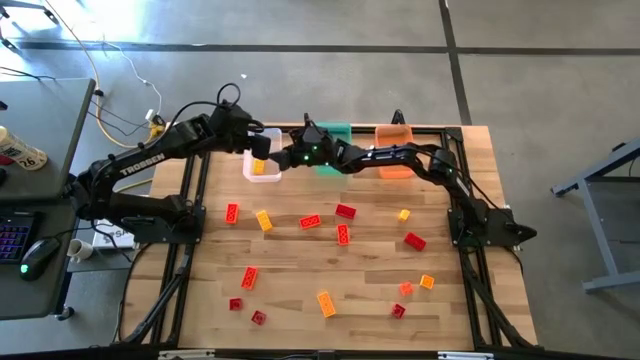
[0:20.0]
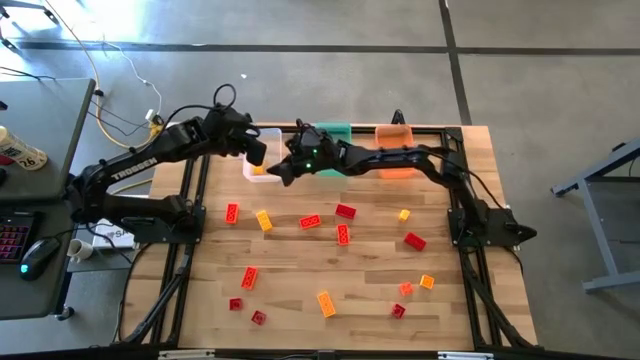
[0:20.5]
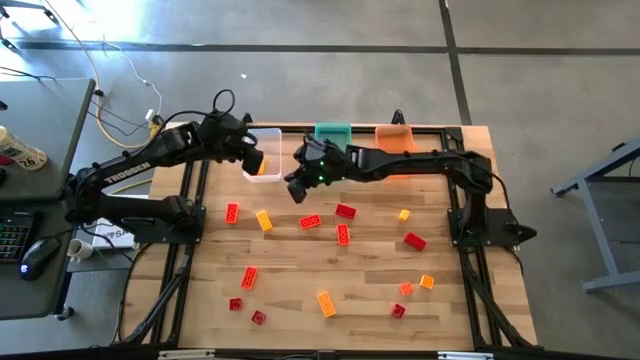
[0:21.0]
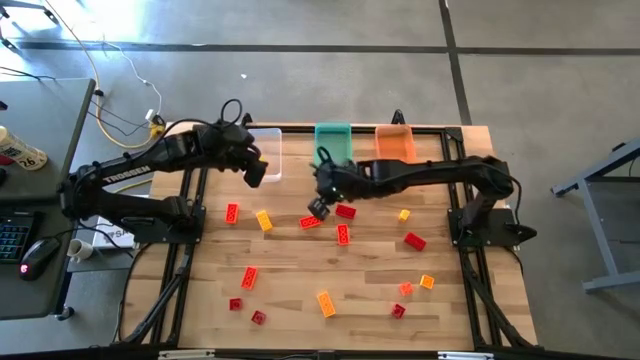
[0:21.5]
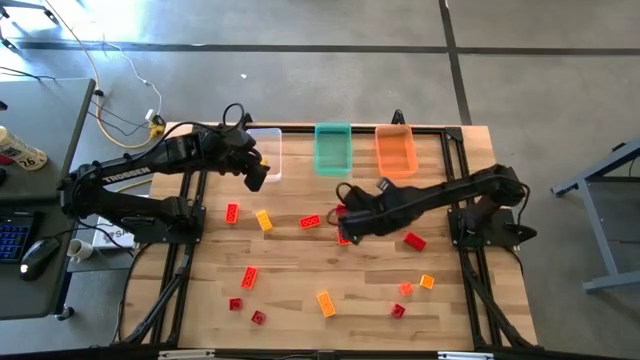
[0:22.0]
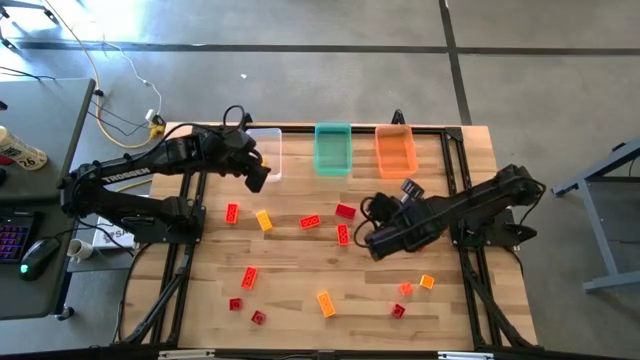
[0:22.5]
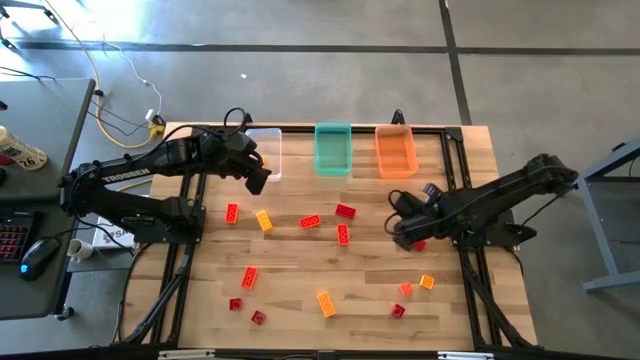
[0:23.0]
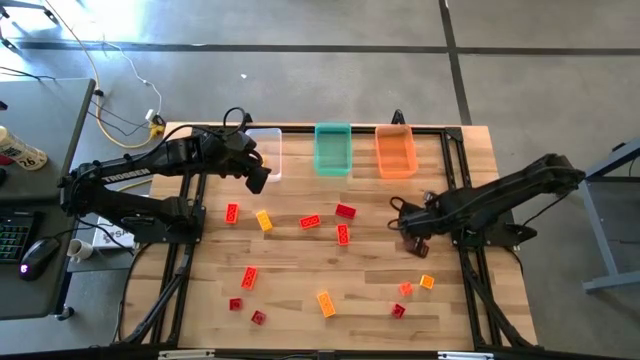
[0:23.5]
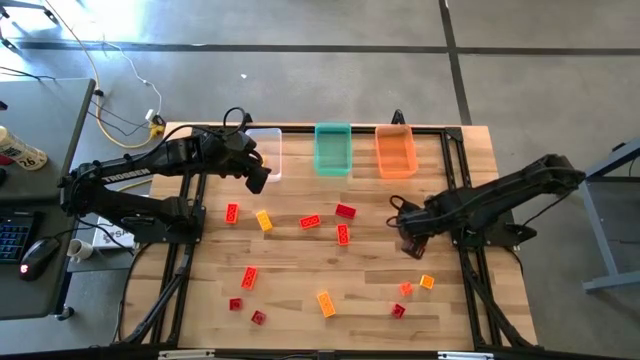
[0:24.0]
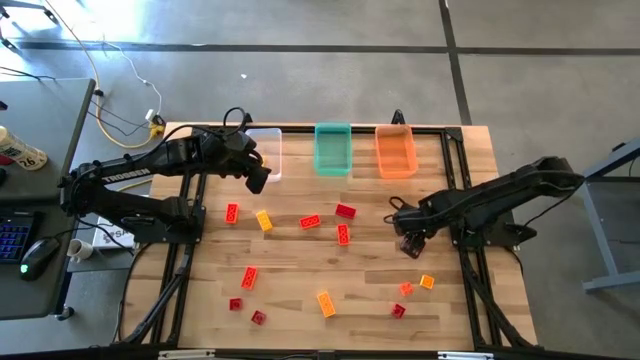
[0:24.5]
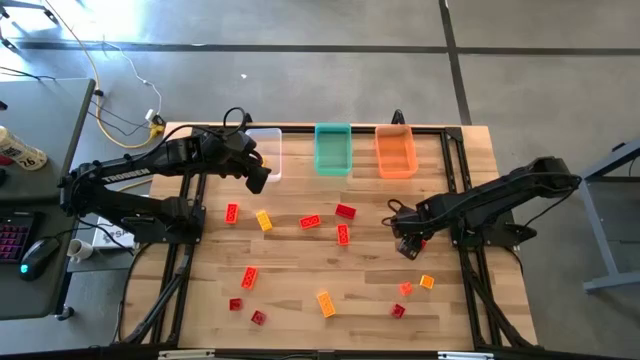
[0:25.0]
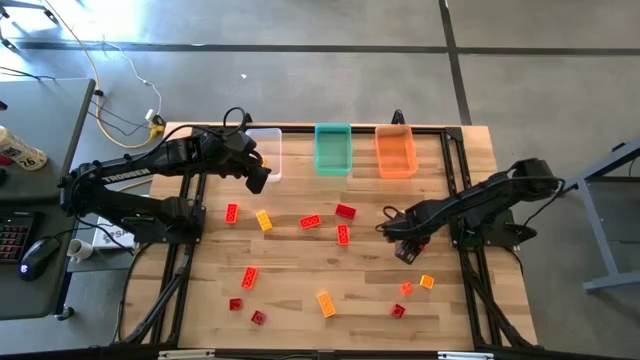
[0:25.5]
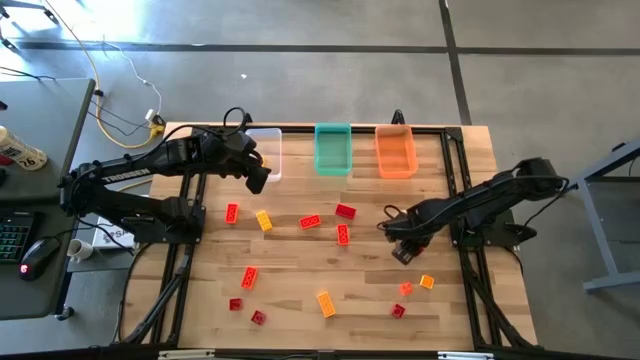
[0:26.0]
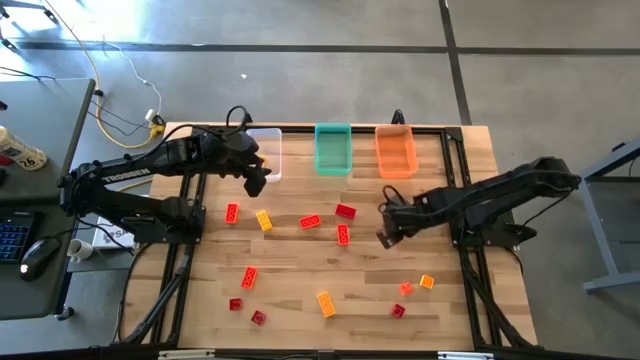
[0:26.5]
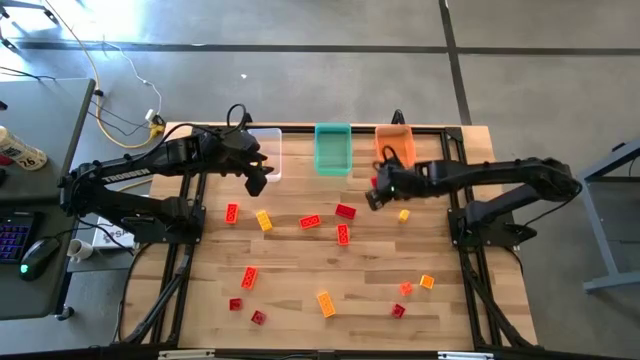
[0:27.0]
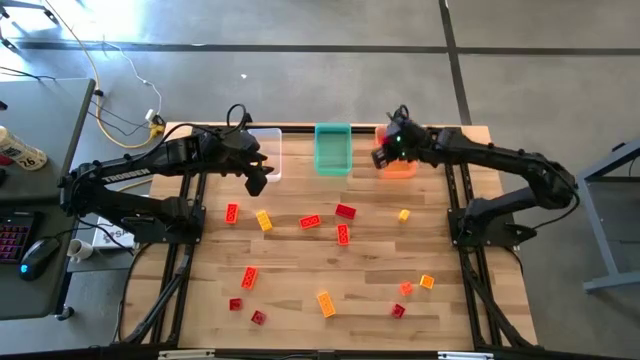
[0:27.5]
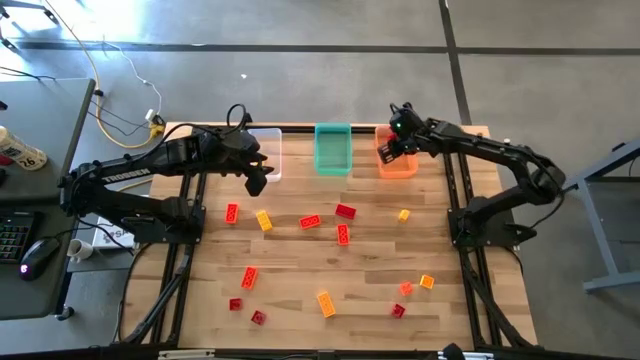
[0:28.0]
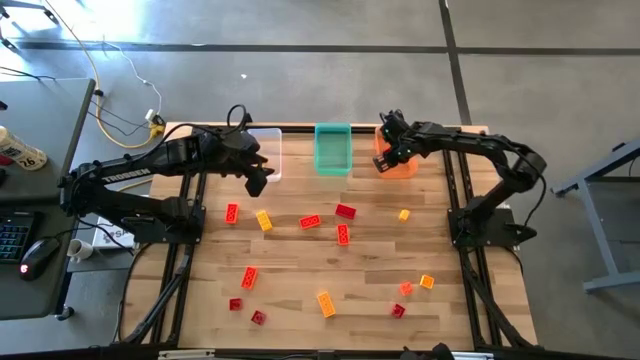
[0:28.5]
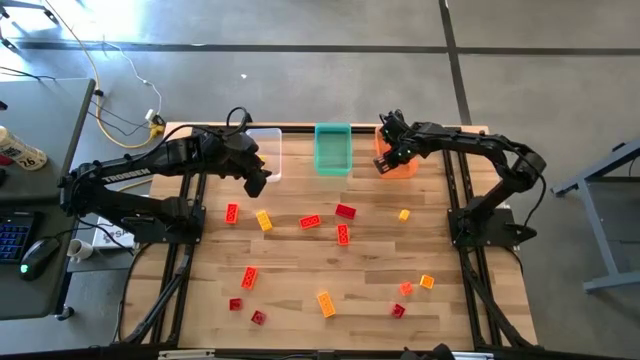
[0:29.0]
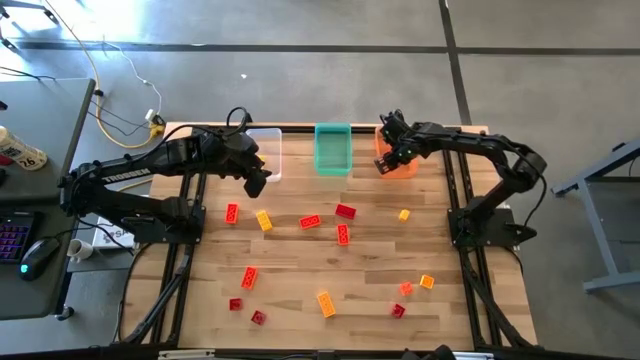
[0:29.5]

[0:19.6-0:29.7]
Task: Sort & place blocks by color
Put the red game piece into the orange bin

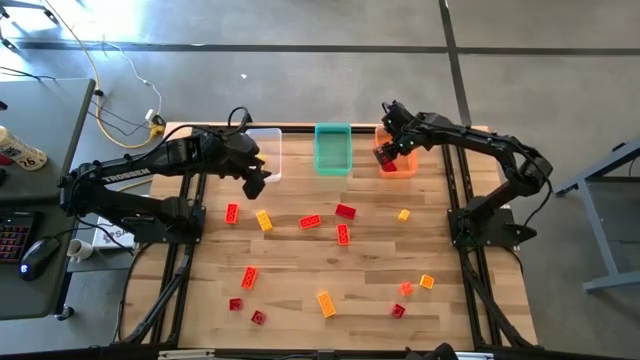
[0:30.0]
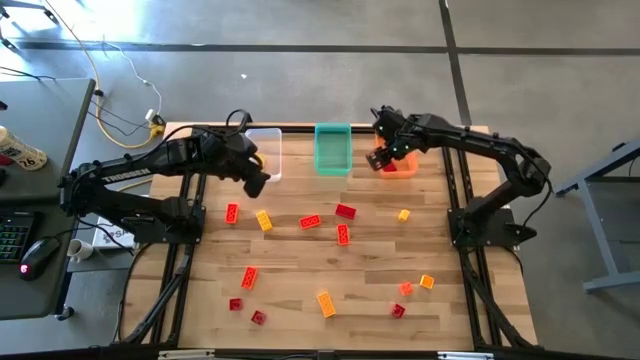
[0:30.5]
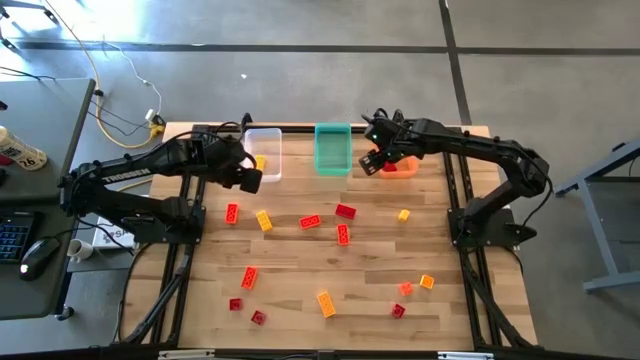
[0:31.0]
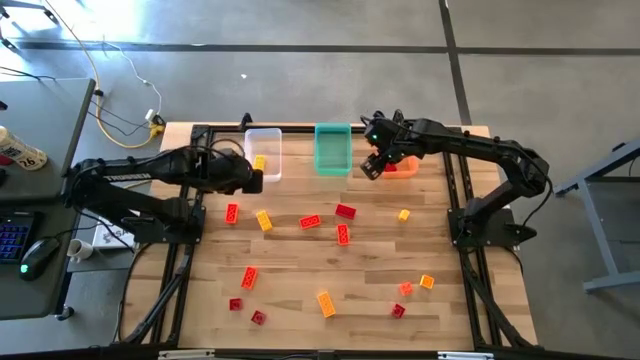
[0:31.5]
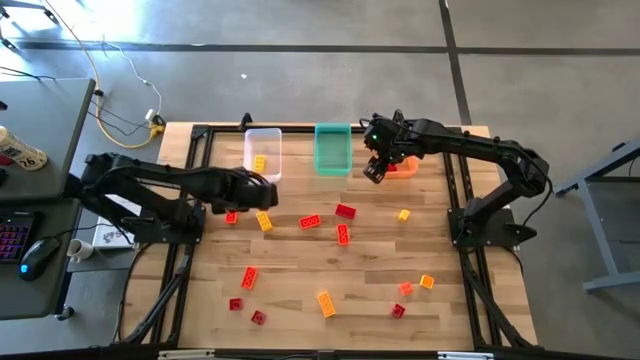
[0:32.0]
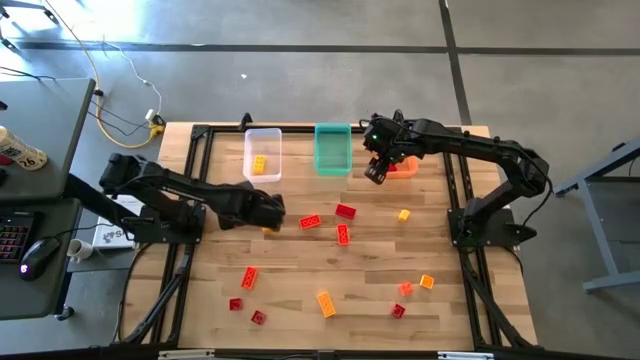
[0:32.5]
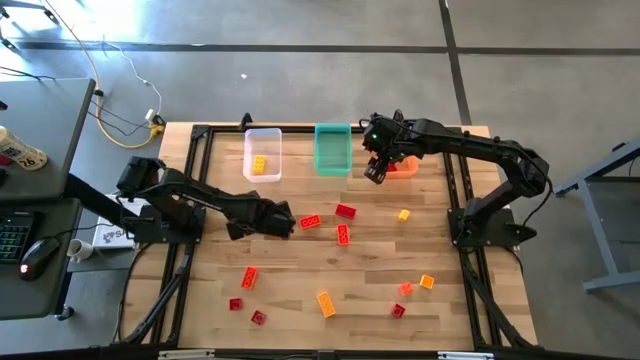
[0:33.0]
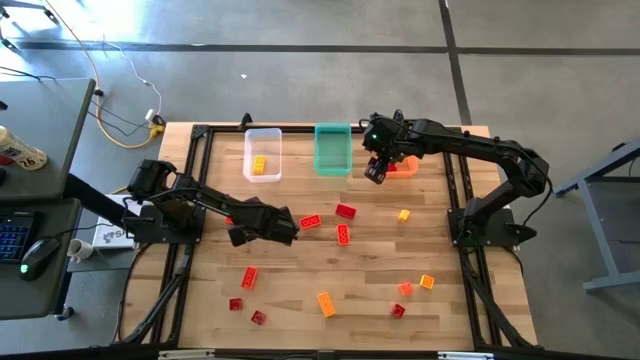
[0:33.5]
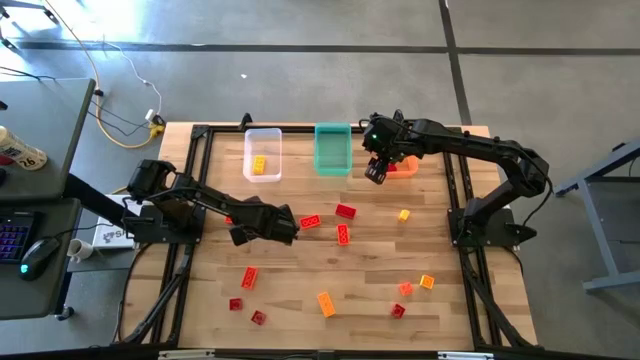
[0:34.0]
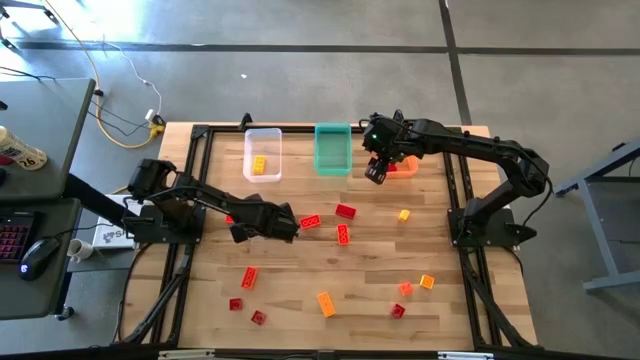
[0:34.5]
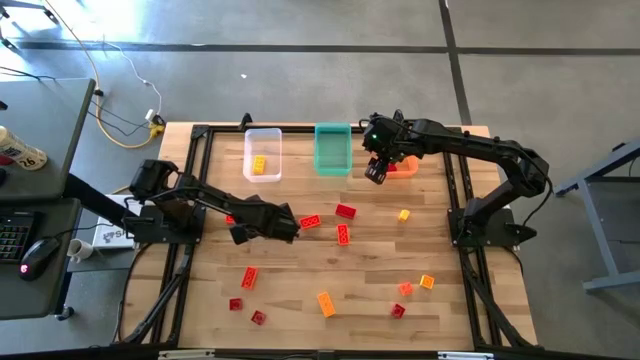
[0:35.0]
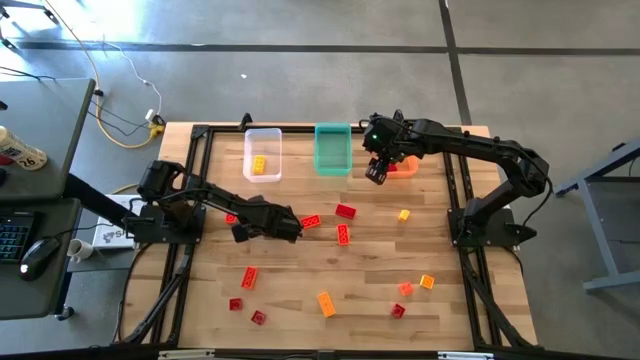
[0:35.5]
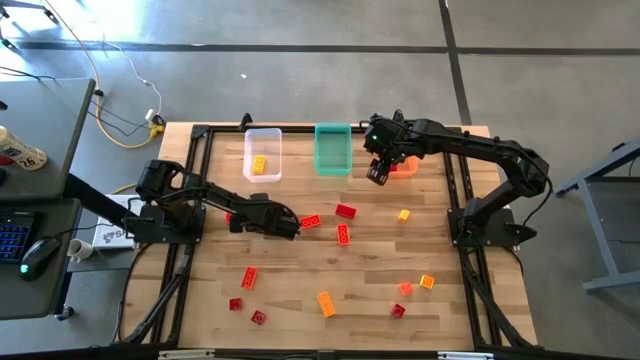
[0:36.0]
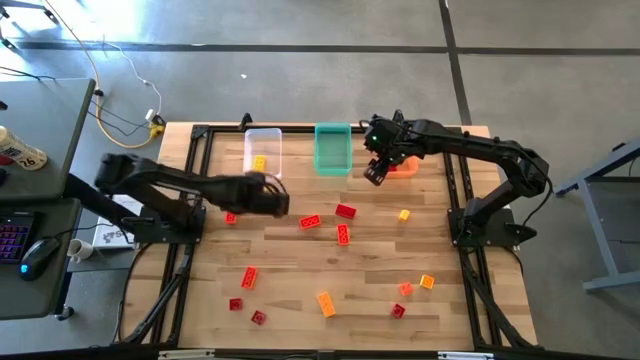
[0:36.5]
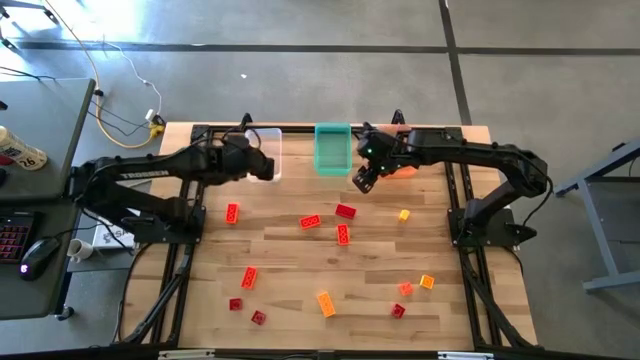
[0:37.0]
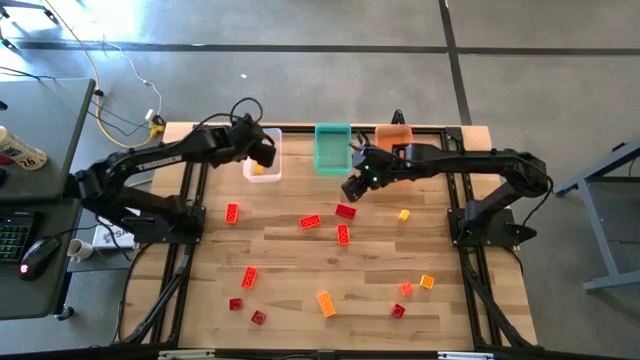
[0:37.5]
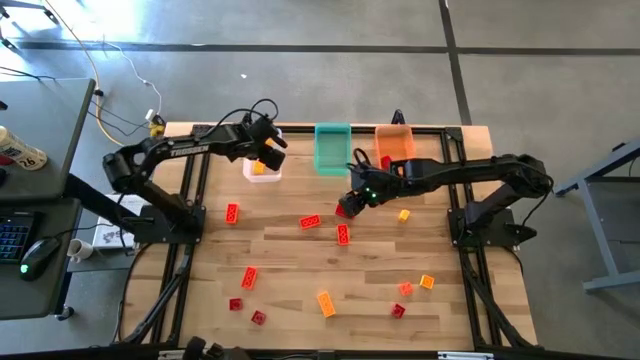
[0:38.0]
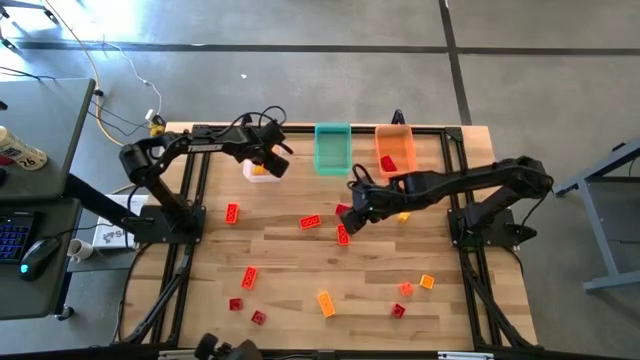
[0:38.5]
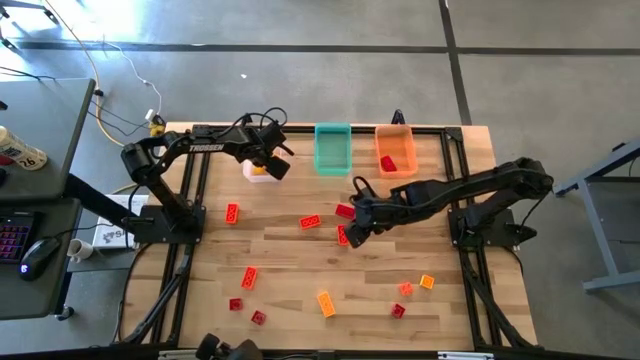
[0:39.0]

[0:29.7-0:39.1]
Put the yellow game piece into the transparent bin

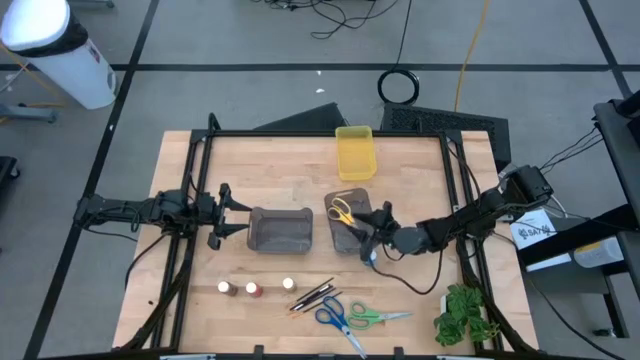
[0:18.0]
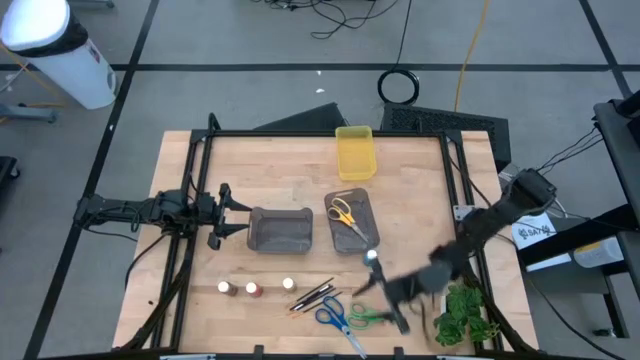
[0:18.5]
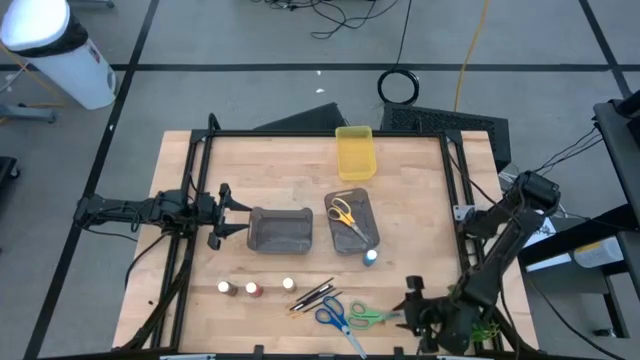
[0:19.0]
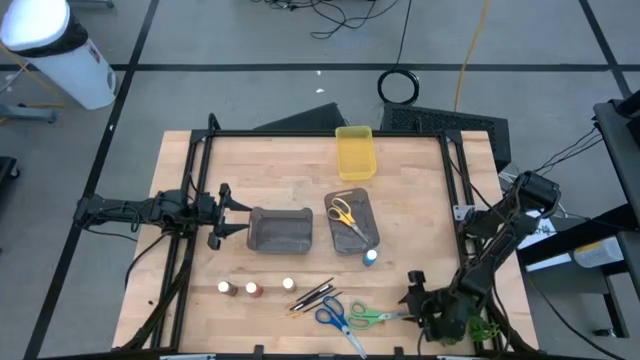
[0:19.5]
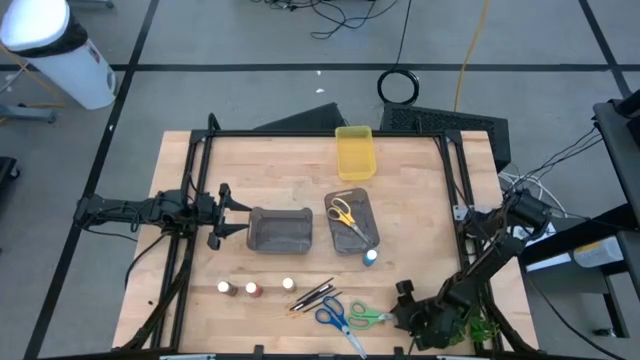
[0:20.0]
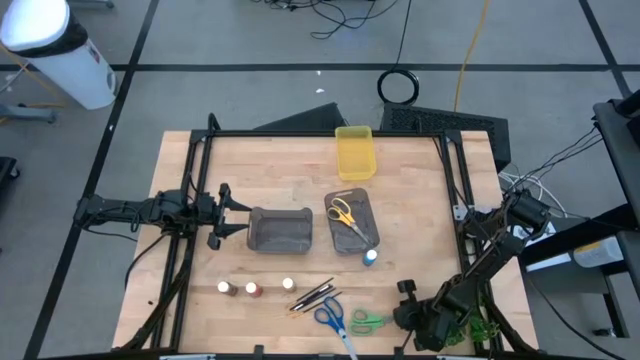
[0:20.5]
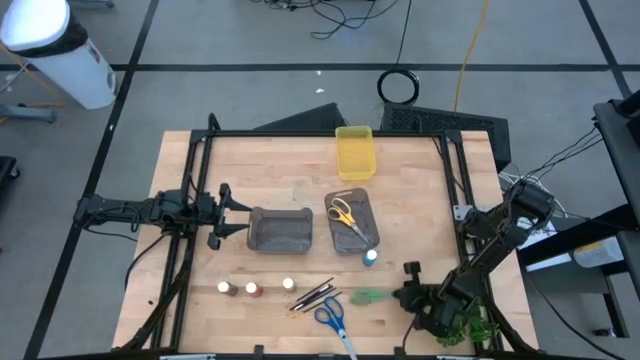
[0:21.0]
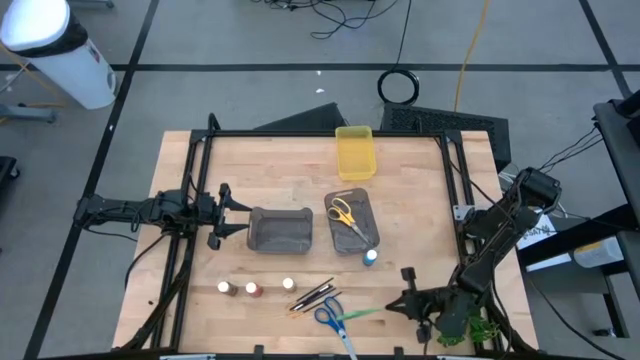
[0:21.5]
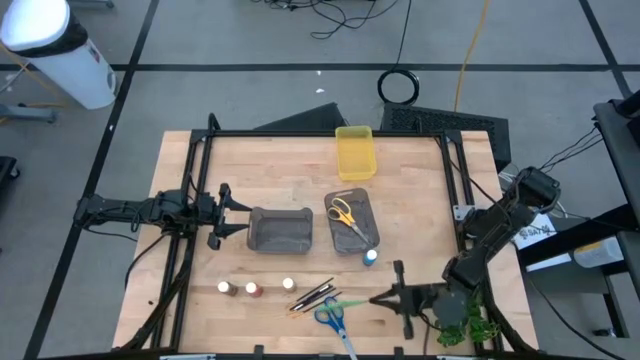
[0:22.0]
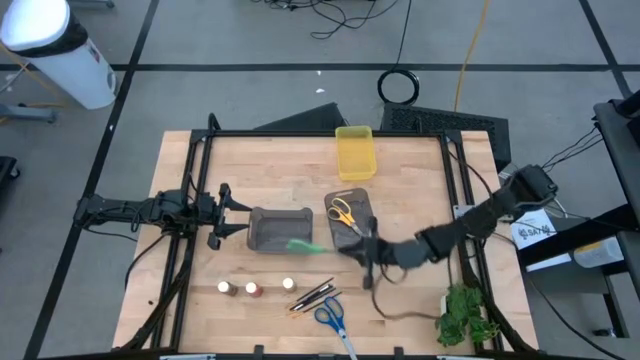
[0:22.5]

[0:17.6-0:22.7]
Task: Pick & Place Paint Supplies
Put the green scissors into the right black bin
